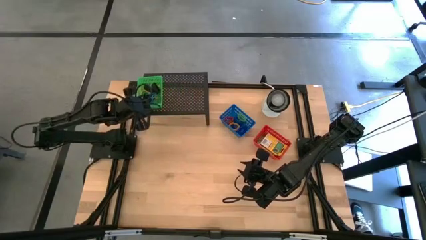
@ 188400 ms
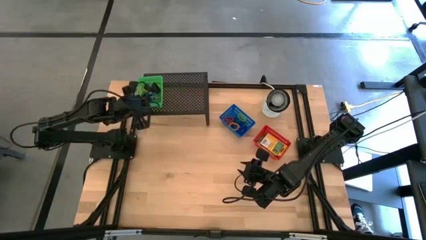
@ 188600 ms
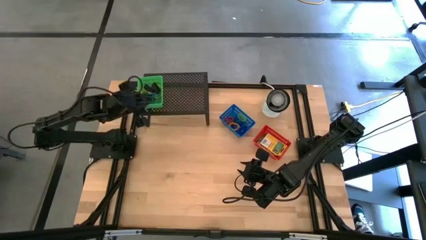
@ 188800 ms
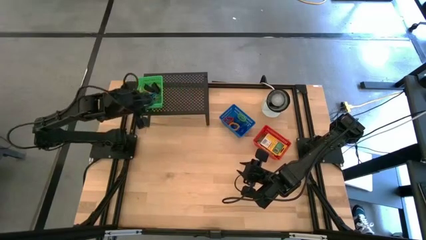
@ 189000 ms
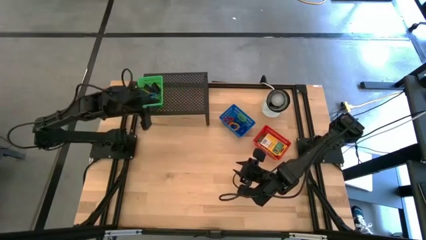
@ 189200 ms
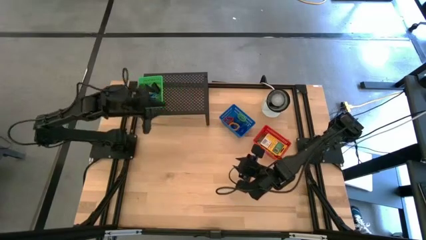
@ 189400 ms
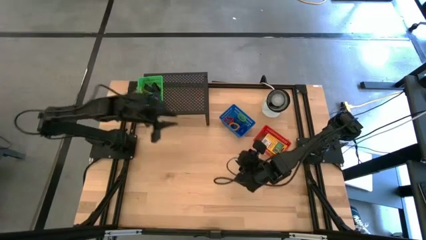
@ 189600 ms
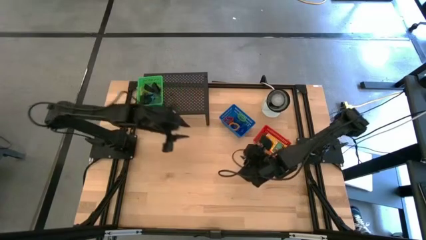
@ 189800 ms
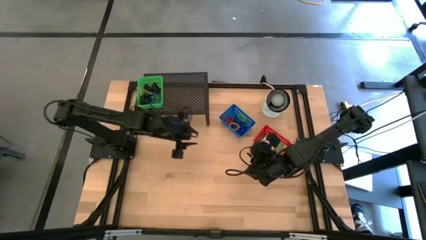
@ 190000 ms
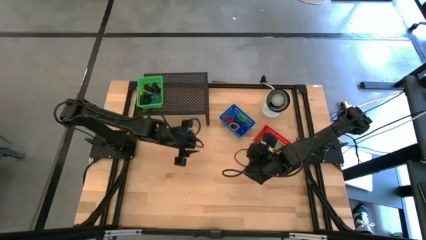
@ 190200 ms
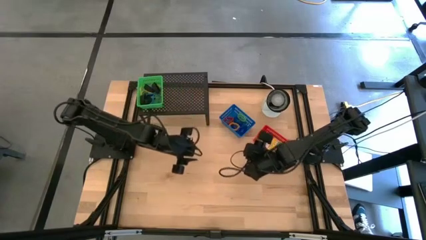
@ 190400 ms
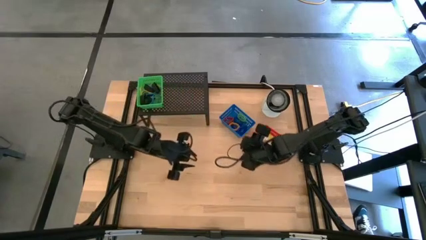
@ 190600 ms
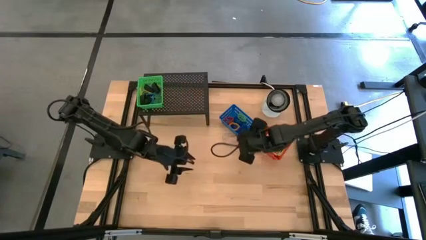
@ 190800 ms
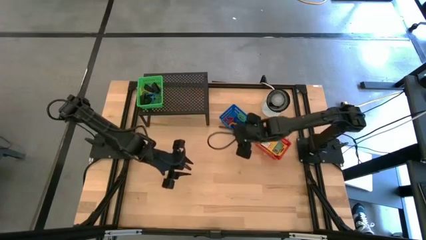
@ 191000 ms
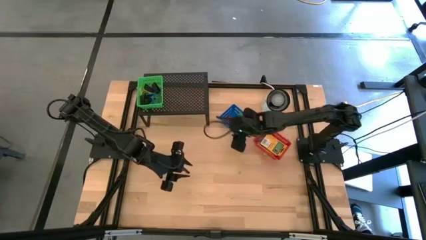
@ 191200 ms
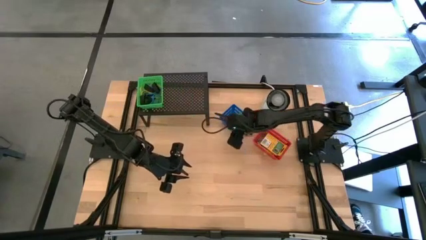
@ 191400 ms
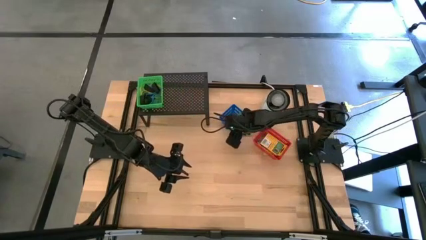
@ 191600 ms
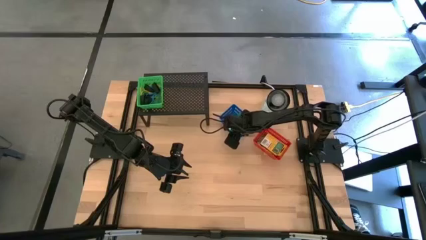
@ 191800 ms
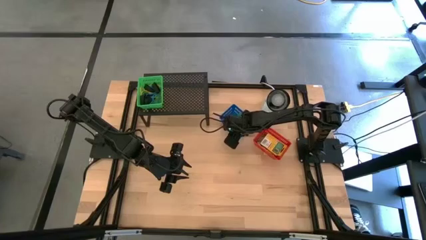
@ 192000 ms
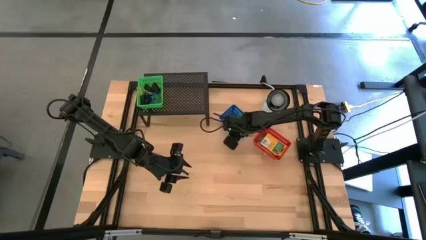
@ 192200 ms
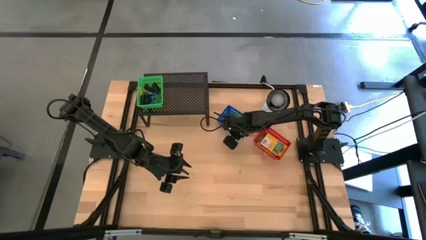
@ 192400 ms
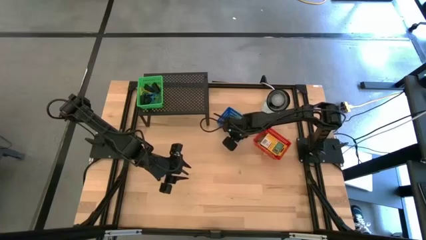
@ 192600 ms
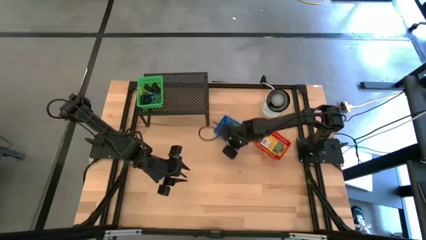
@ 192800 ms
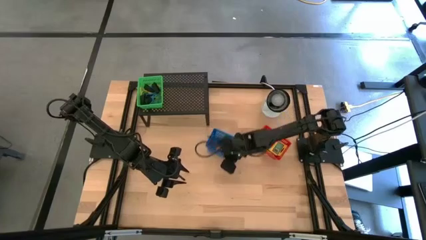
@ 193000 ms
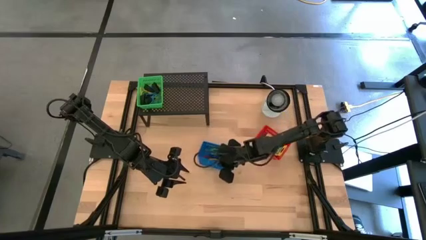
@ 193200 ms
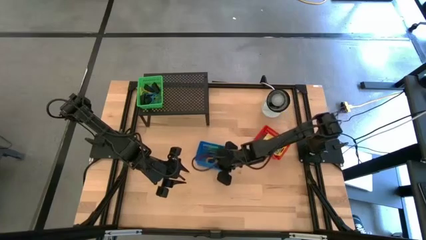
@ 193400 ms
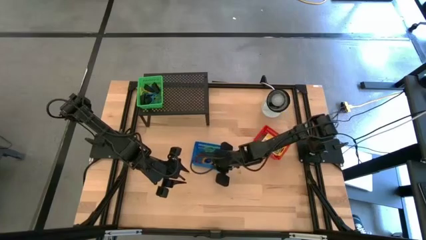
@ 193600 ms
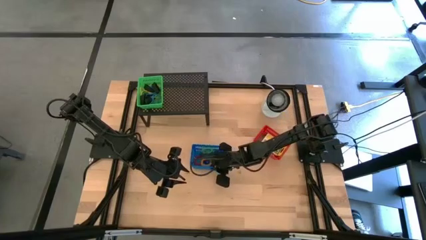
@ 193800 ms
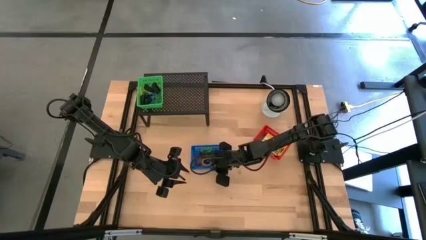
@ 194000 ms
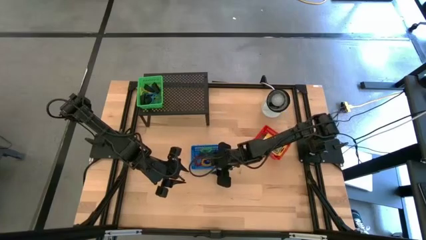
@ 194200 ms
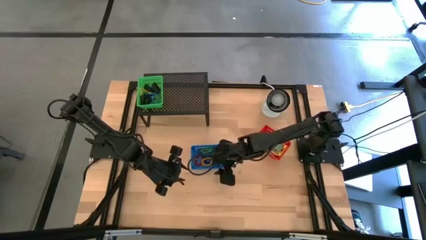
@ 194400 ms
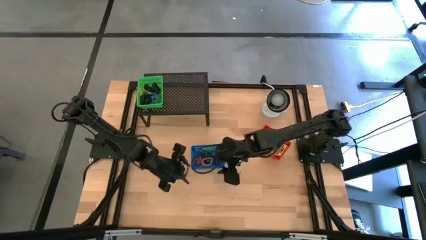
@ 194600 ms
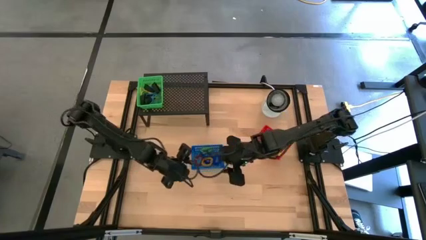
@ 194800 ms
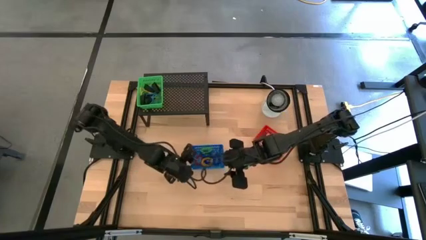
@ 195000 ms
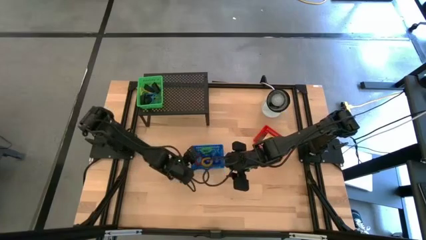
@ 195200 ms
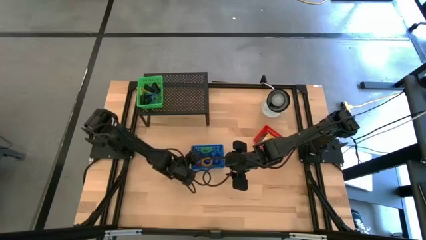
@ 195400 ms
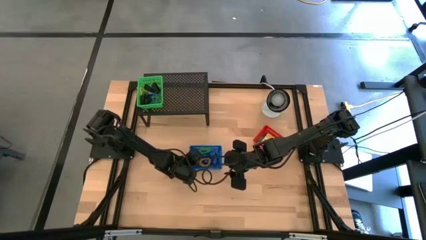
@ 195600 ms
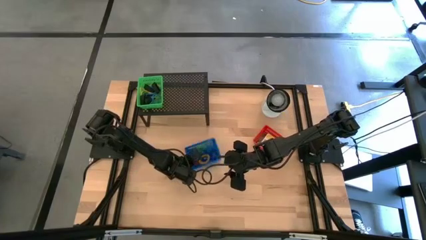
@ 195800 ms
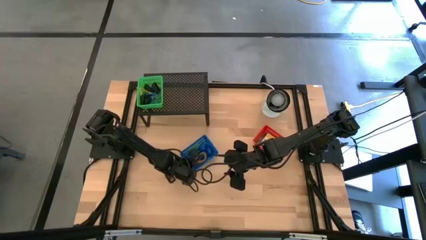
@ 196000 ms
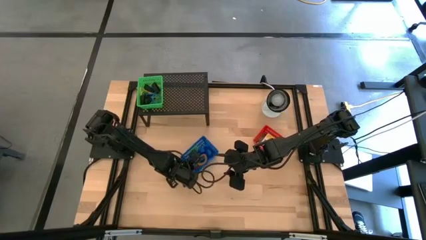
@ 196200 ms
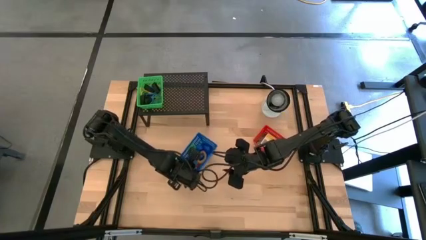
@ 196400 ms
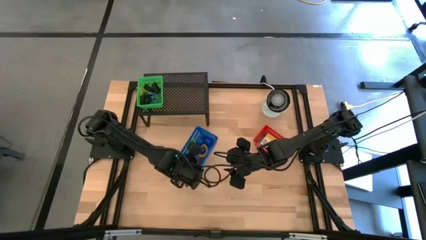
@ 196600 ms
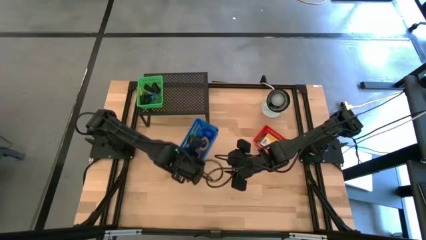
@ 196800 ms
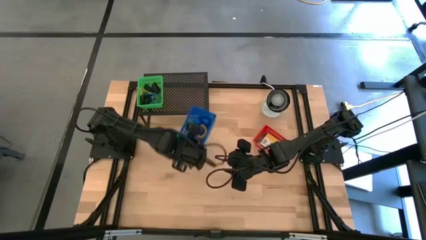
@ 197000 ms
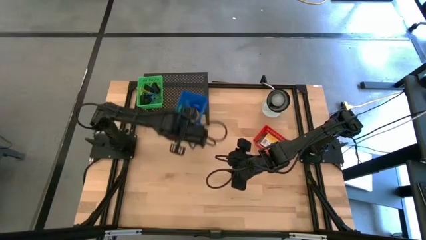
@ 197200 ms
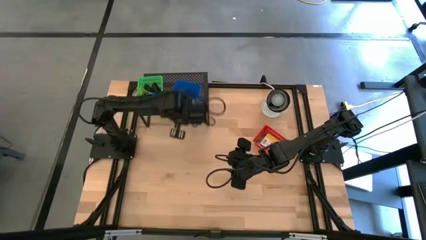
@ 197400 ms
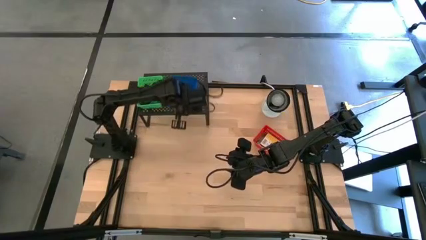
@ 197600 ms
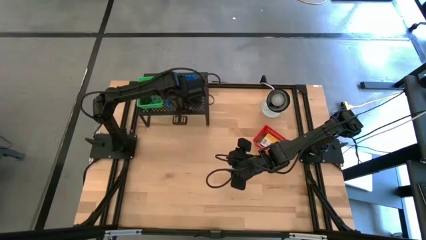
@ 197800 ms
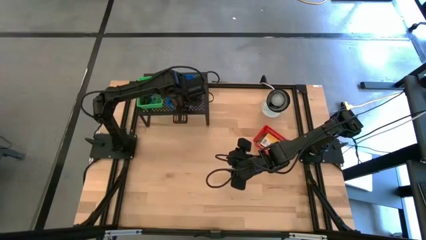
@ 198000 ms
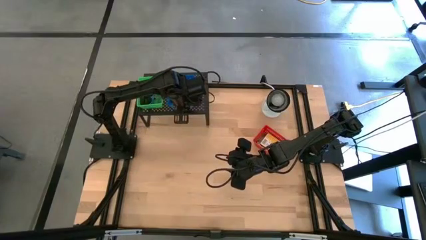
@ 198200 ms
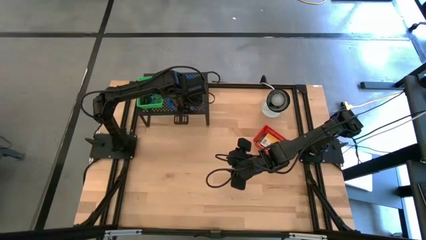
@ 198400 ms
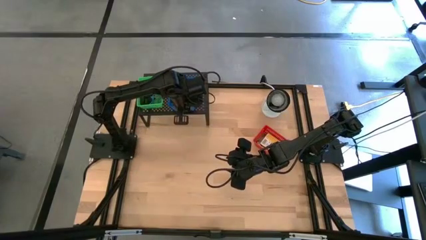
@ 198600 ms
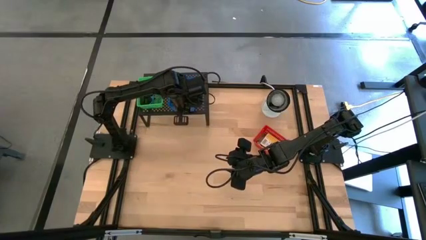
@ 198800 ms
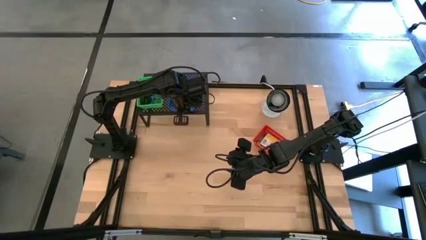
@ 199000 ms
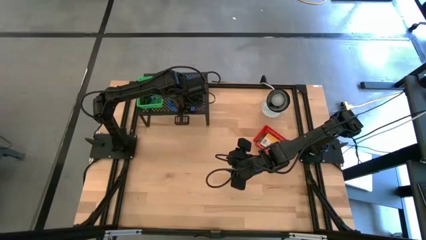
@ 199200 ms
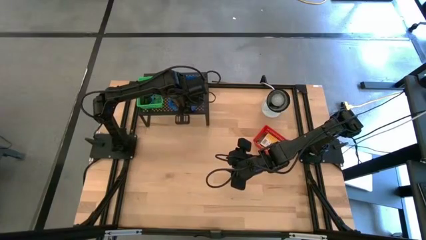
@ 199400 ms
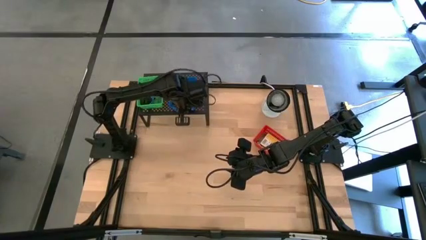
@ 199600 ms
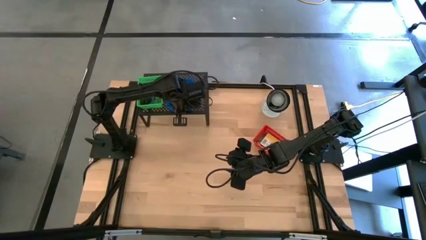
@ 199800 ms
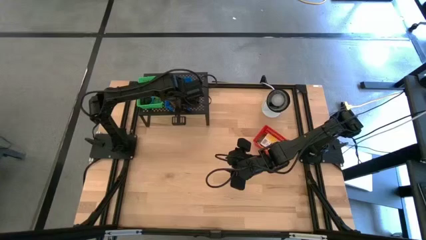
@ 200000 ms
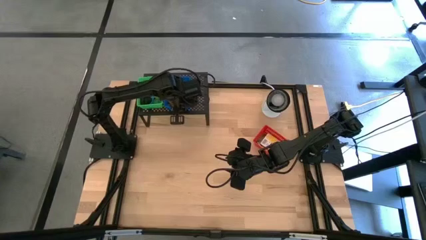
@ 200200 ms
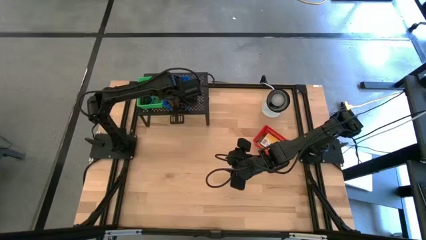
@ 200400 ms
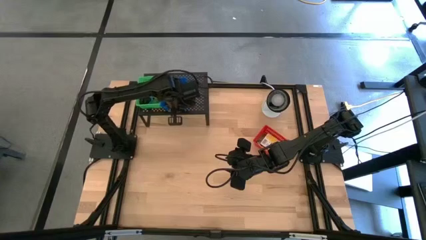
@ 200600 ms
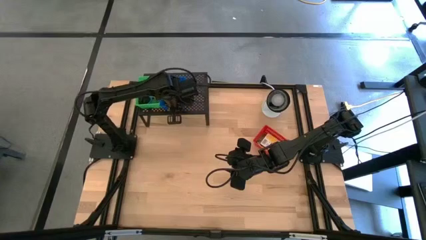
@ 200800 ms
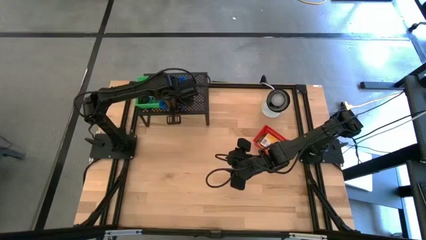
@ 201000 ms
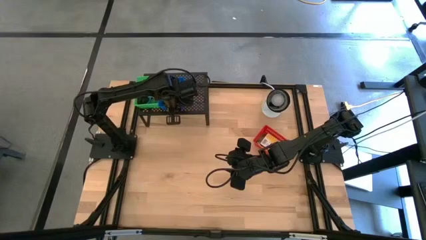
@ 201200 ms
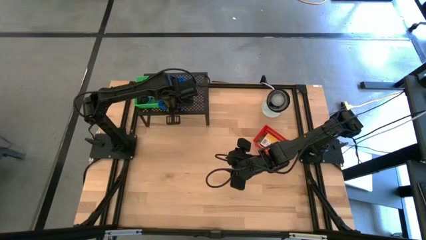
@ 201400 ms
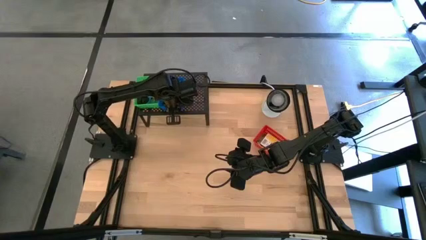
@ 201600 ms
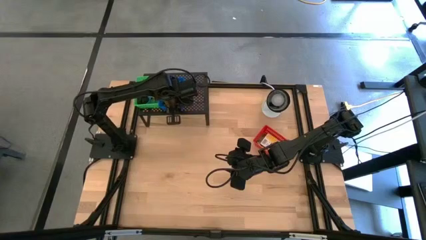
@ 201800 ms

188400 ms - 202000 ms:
Task: Pick & Place Office Desk Supplies
Put the blue basket on the shelf

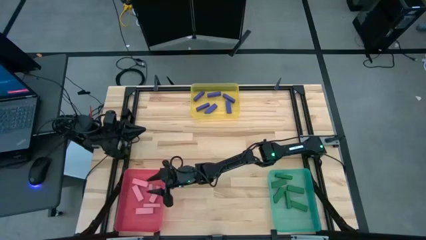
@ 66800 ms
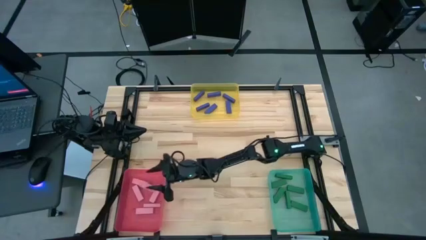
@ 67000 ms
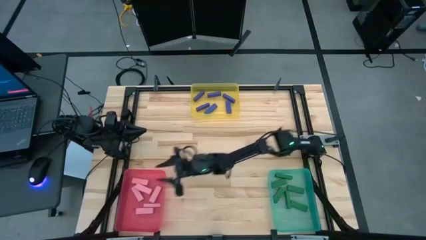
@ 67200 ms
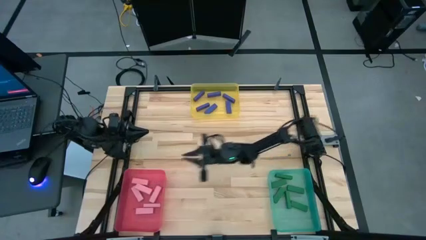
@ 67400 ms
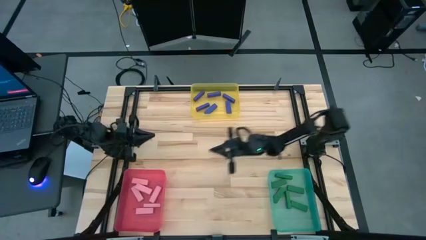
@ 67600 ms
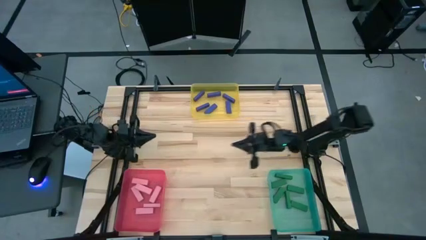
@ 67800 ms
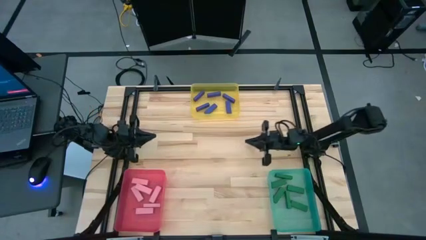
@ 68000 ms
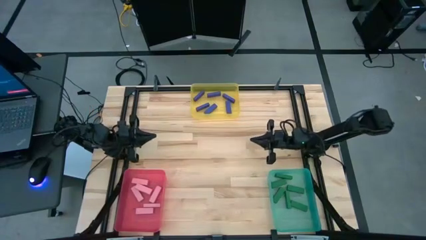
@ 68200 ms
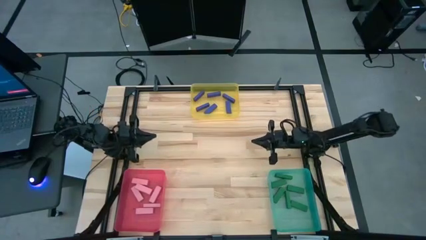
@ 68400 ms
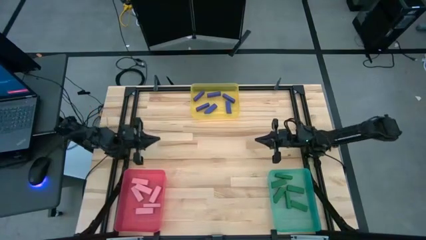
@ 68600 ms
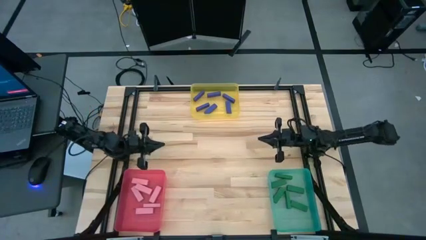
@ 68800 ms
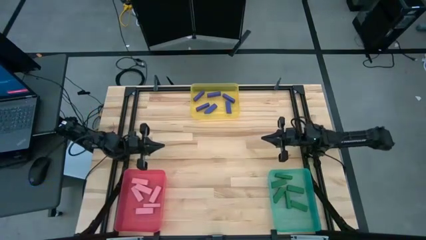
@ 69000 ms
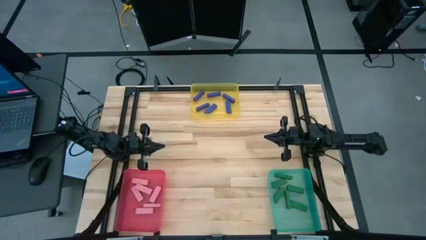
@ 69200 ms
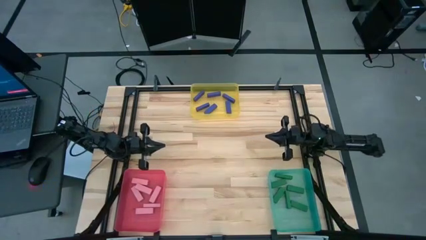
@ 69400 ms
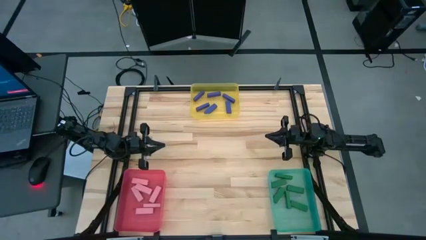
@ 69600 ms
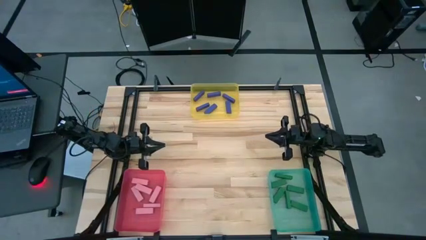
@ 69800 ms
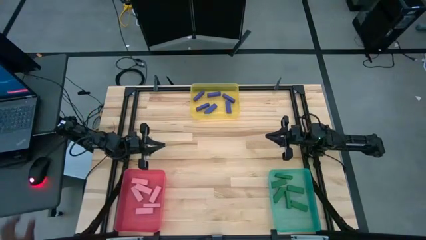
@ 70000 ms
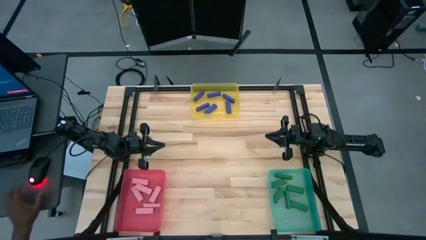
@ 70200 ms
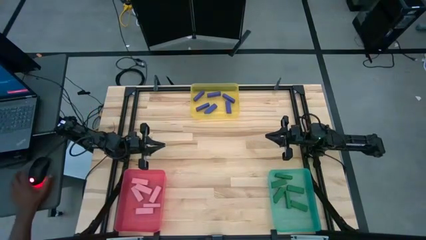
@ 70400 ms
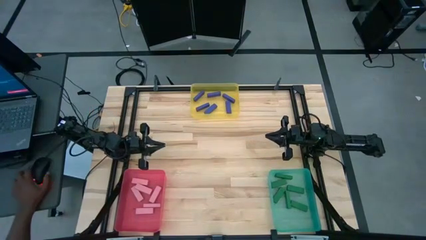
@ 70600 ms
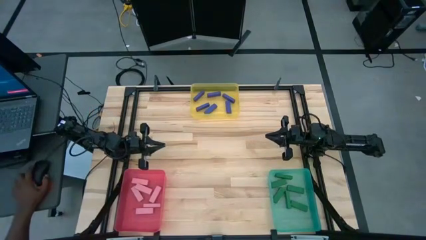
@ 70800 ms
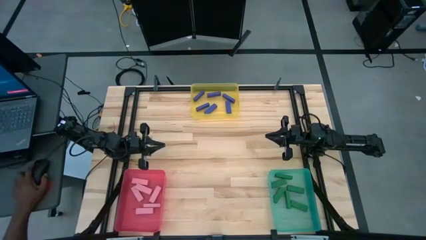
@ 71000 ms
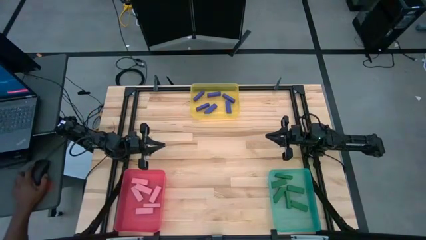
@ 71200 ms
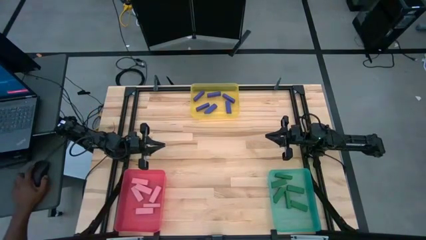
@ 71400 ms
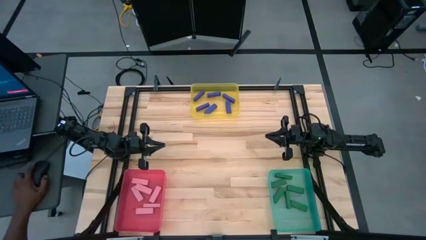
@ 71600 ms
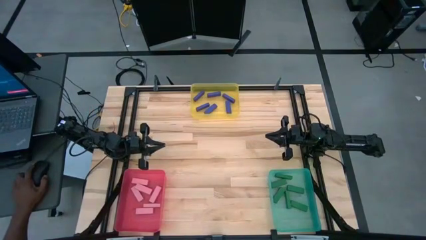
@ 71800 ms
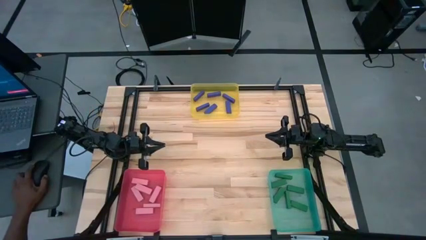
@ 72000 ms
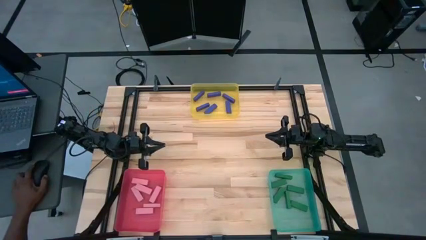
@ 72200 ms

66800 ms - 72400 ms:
Task: Sort blocks
Return to Home Position
